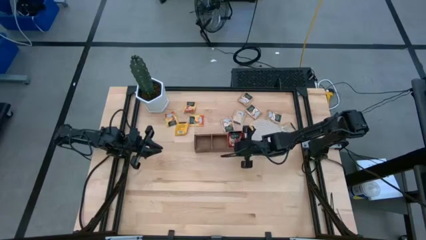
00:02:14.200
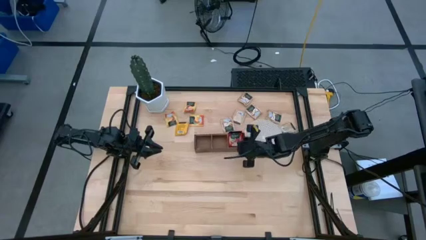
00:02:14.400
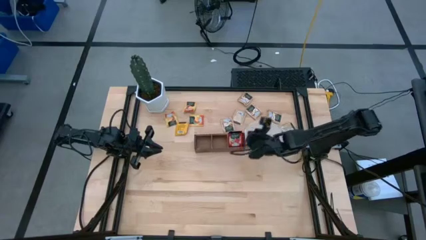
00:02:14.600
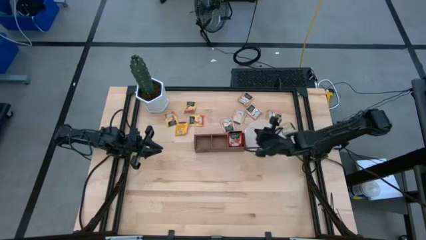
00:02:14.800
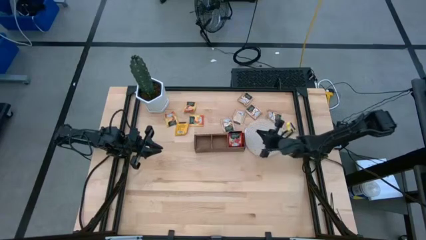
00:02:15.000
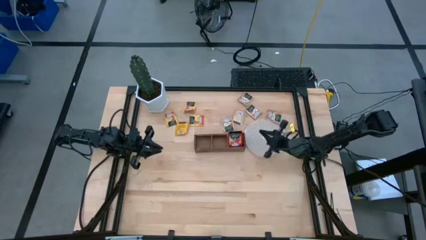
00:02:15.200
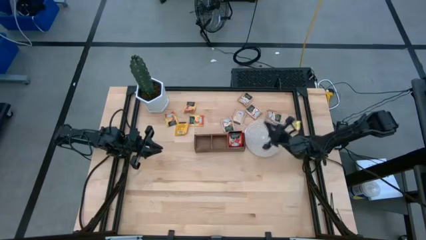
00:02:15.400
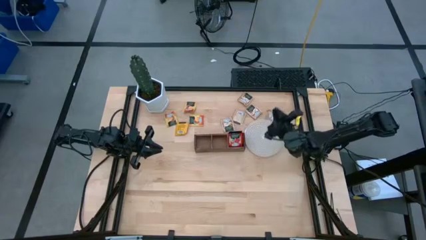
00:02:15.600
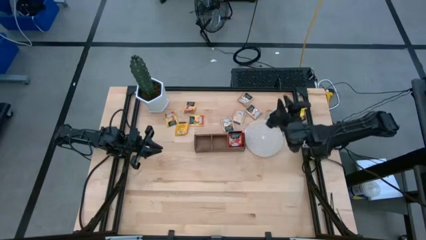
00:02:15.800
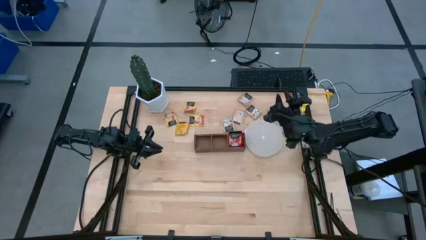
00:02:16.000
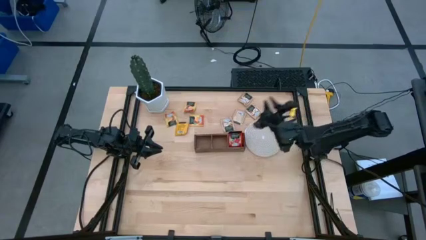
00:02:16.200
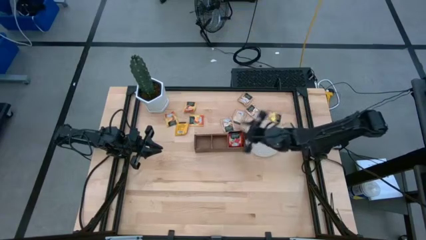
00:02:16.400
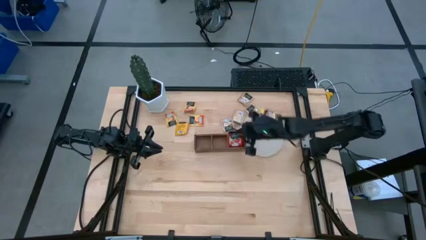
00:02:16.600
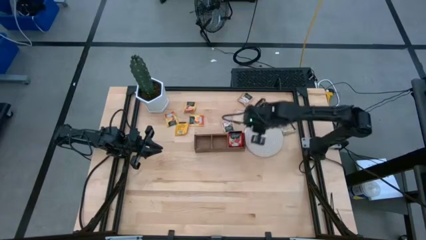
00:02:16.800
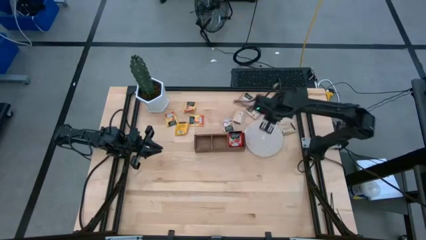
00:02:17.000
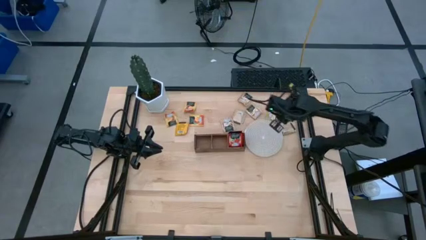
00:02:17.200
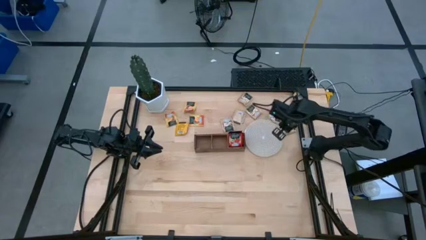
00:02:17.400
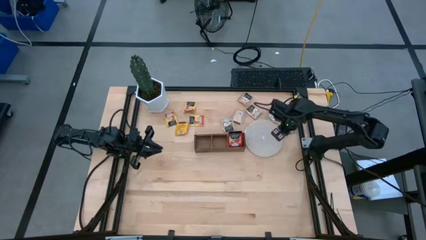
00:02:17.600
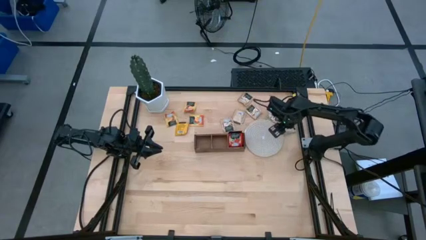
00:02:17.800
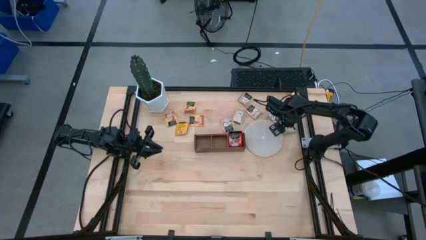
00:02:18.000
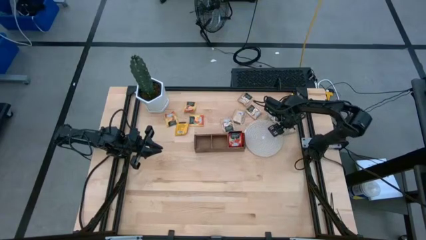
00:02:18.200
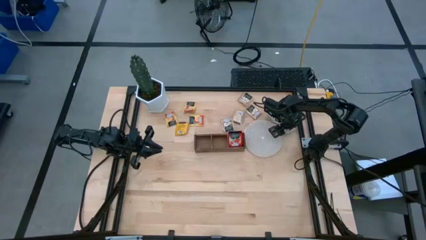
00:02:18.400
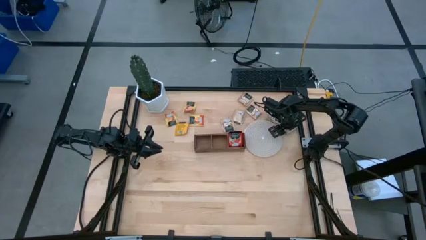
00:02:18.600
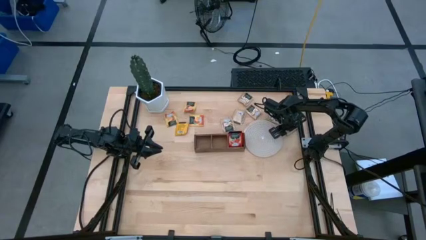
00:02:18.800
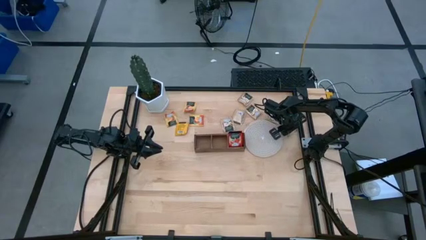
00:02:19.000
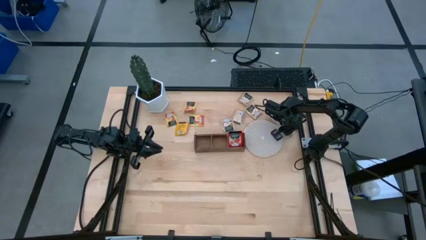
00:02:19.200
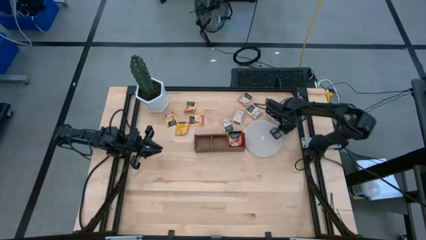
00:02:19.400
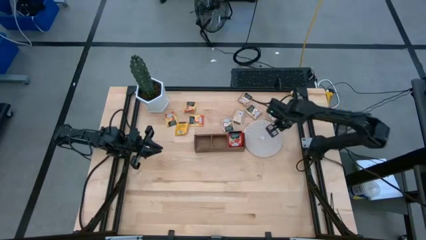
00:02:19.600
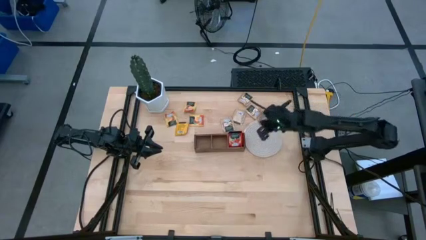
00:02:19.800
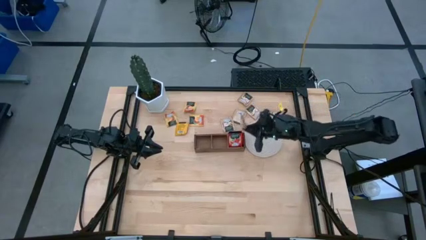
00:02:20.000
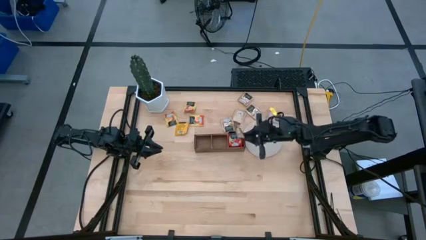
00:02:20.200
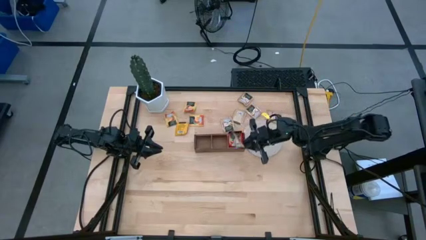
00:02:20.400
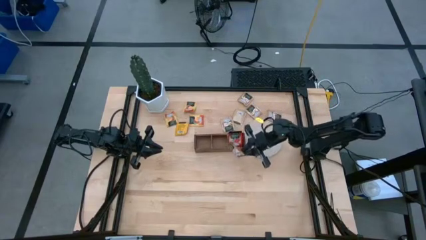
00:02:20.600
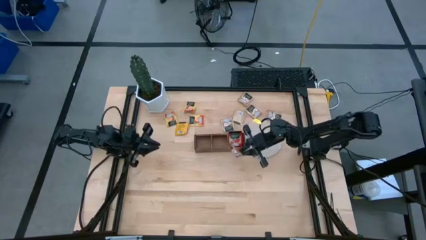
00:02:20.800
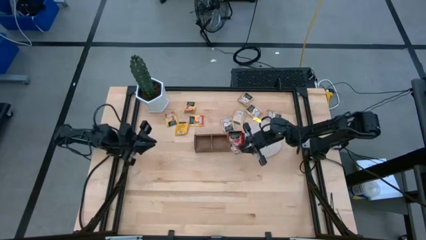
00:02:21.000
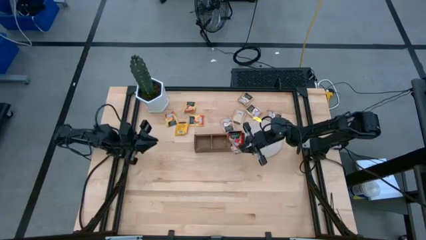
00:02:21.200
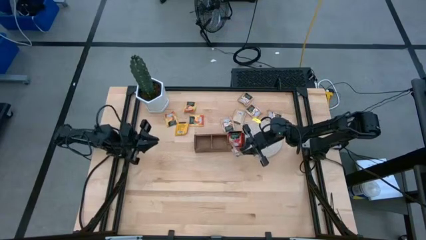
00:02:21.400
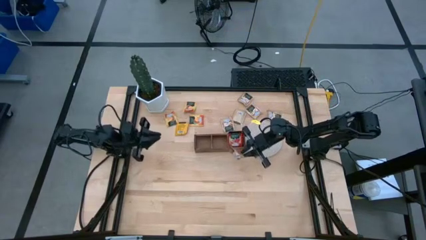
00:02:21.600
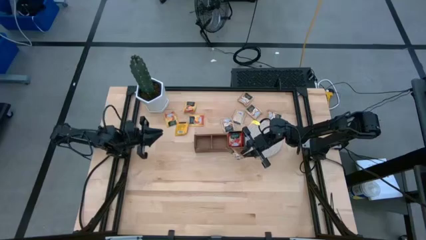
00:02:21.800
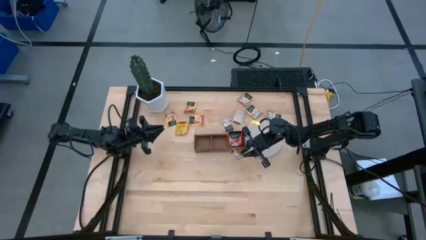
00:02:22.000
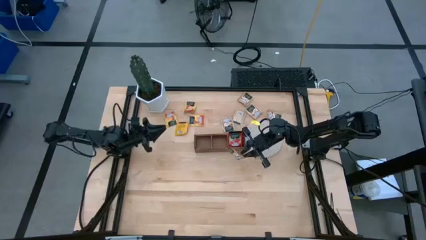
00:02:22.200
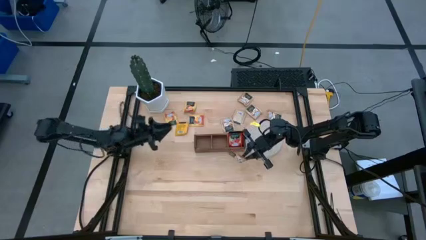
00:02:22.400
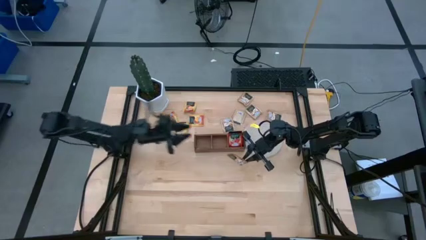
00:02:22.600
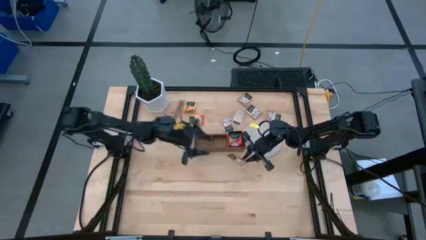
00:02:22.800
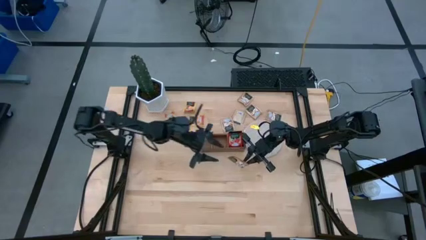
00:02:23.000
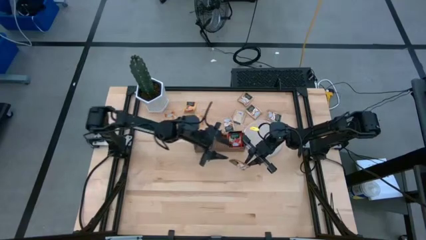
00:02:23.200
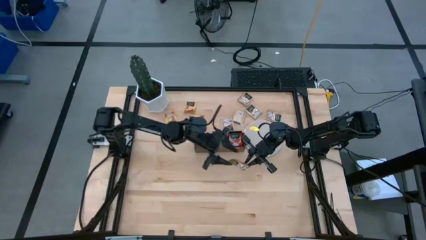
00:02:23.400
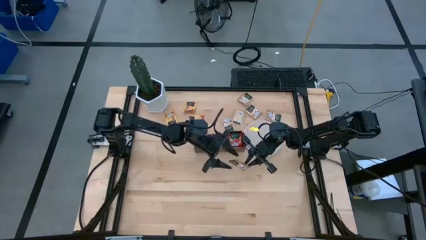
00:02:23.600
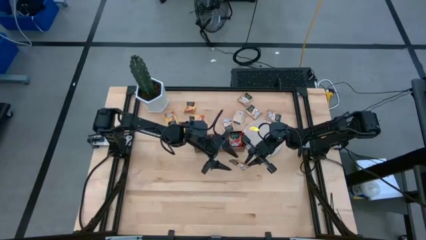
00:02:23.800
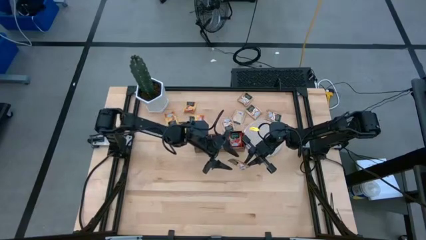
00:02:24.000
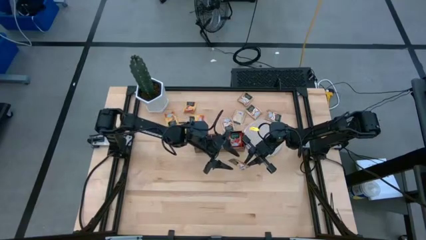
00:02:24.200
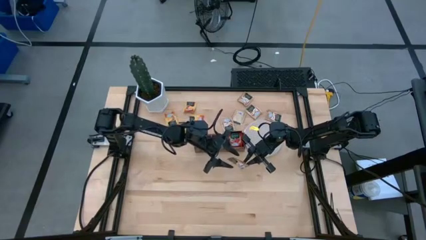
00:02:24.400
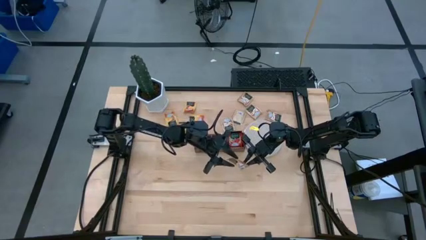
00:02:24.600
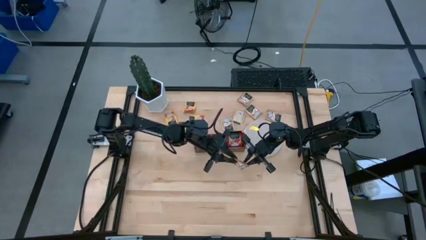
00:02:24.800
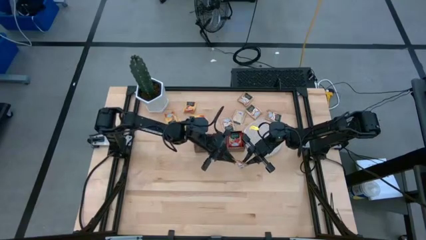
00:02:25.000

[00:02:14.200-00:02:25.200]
Task: Pick & Place Tea
Put the brown tea bag into the middle section of the wooden organizer

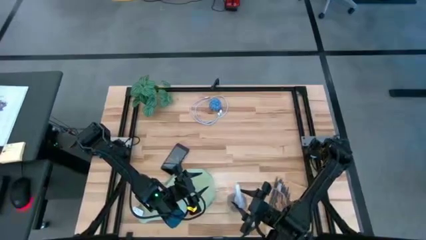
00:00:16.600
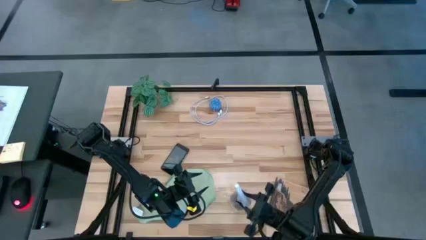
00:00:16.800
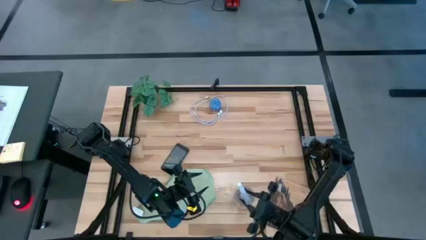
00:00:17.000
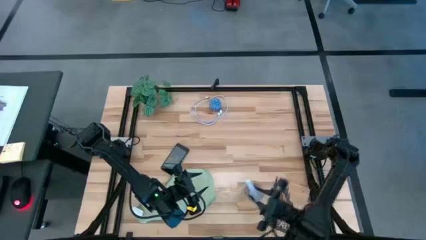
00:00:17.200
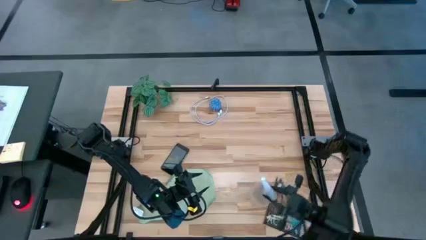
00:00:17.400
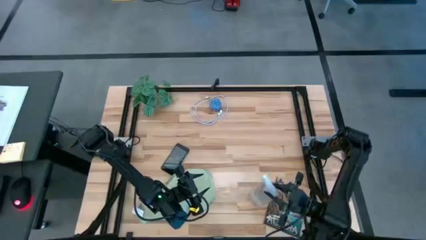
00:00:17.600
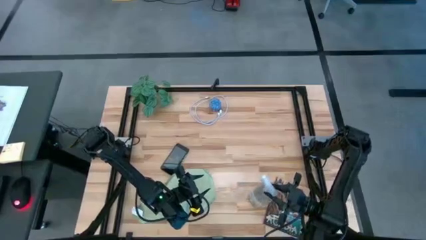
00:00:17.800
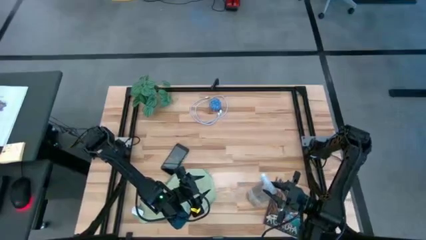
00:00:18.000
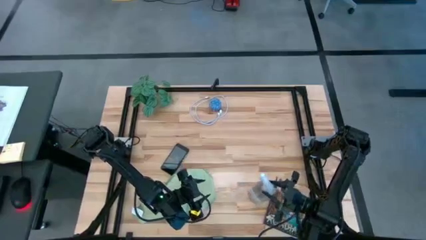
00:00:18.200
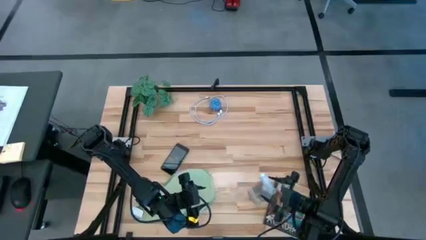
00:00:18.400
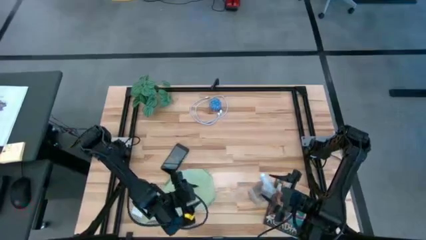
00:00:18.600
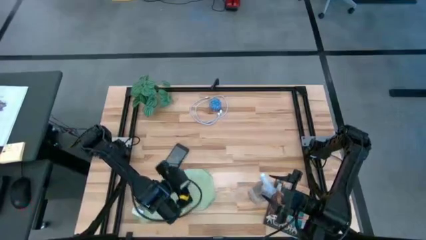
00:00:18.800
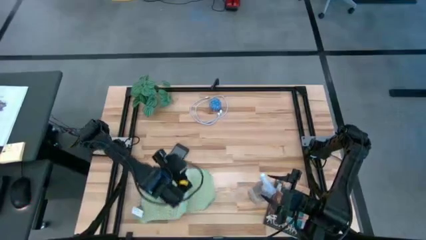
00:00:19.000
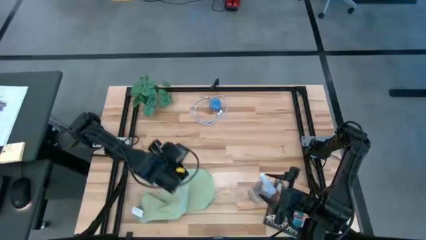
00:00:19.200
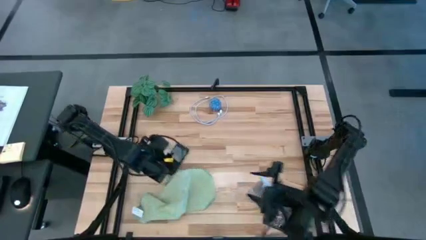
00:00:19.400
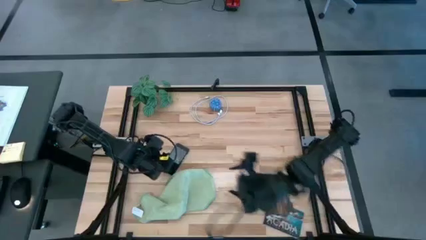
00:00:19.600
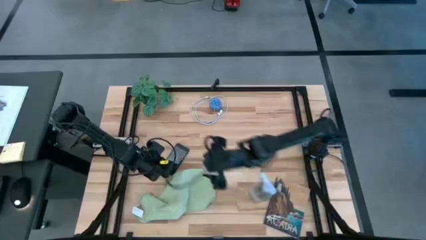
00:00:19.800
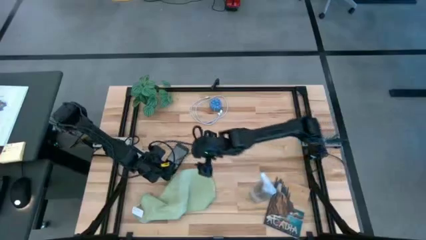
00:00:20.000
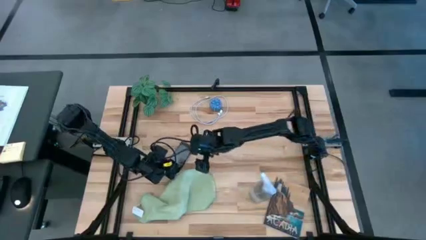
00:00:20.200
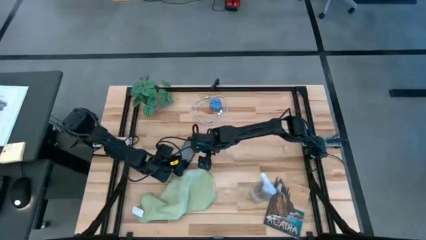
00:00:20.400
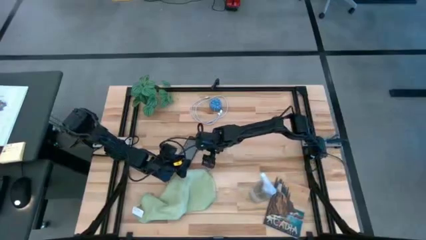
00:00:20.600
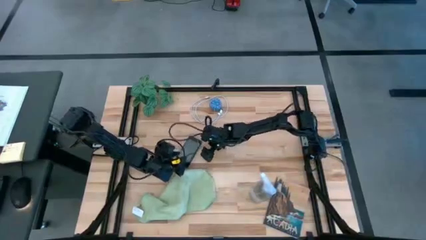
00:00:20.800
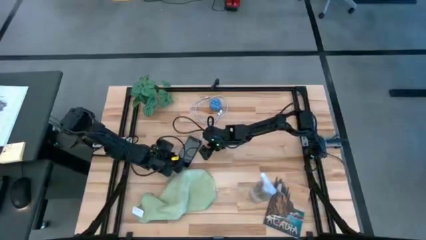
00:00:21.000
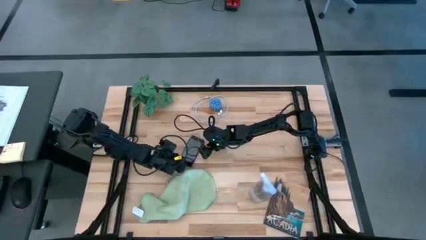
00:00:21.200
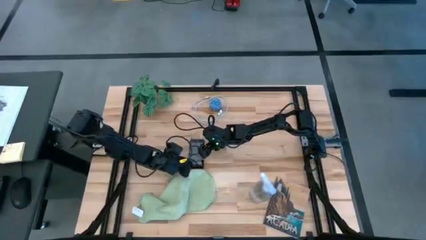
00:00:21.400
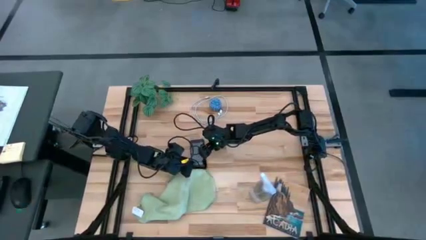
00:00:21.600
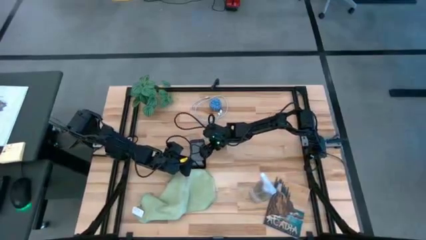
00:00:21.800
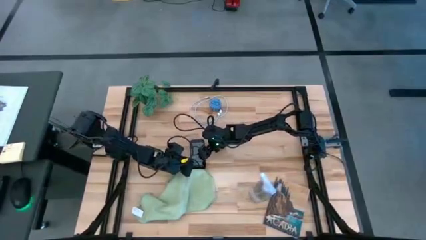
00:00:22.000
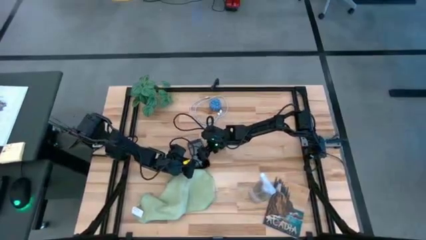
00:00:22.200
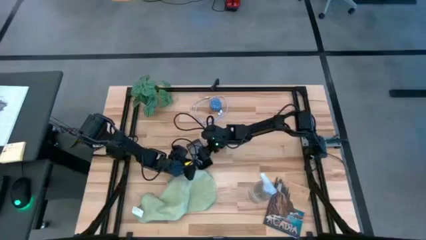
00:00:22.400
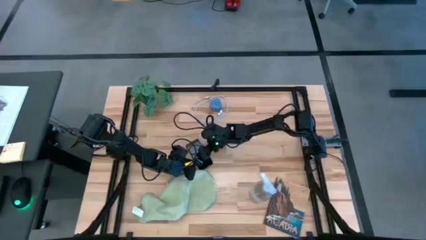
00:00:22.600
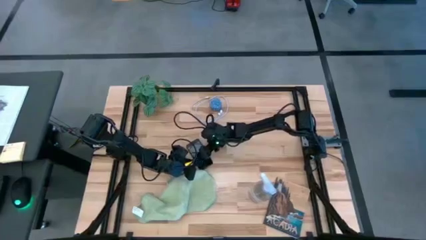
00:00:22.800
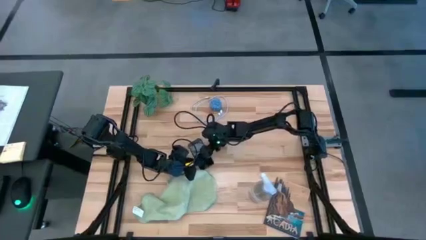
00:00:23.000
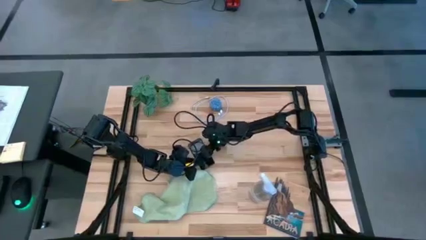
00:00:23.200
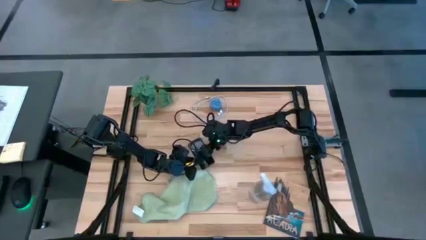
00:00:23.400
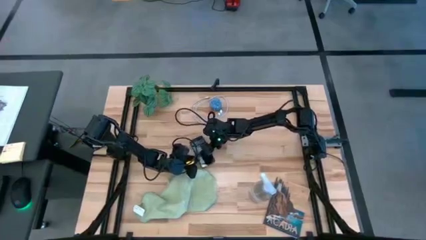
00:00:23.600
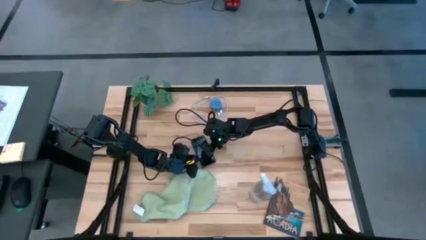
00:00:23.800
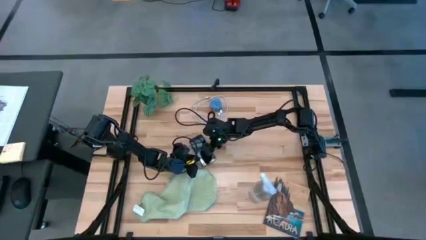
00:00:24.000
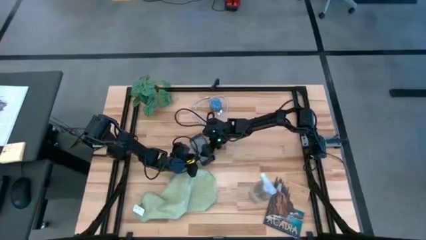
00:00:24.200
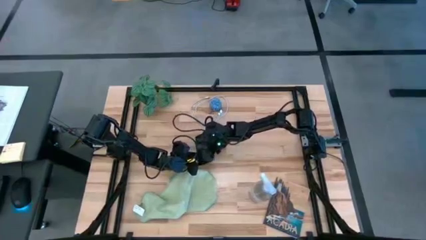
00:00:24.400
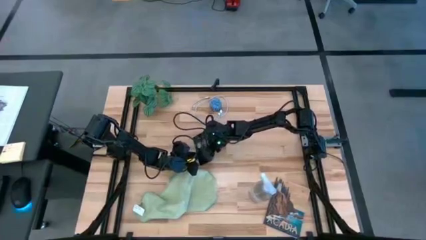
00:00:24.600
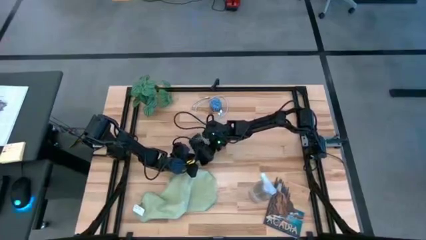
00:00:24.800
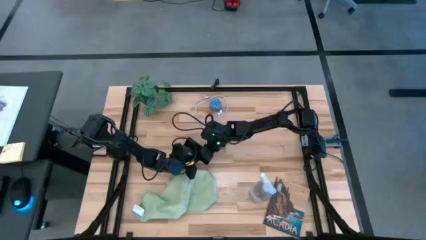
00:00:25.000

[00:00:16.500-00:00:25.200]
Task: Apply microfiber cloth
Spray the phone using the spray bottle
